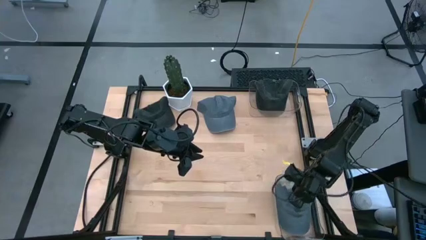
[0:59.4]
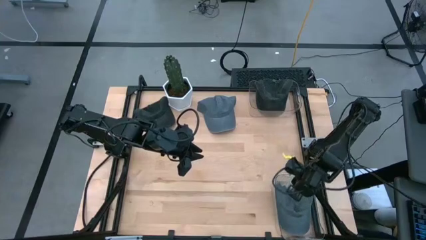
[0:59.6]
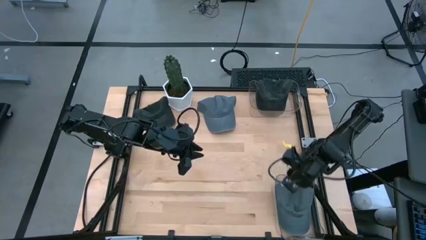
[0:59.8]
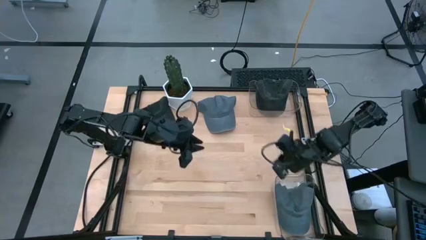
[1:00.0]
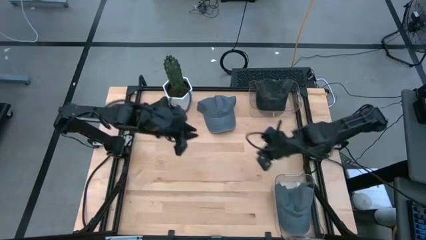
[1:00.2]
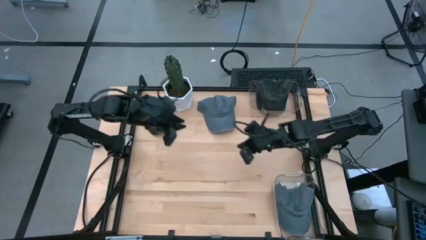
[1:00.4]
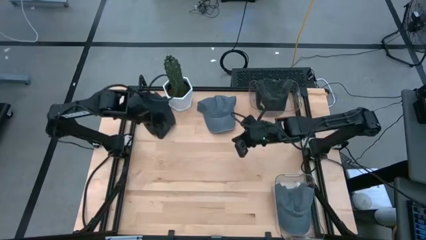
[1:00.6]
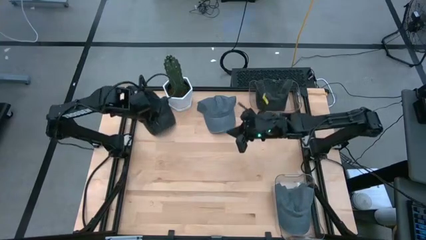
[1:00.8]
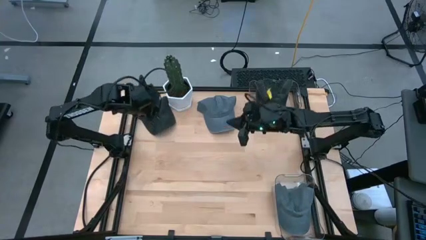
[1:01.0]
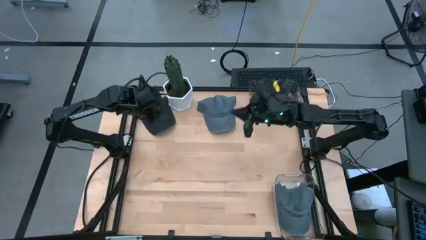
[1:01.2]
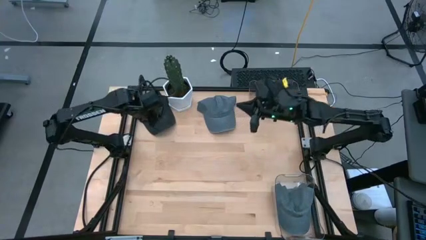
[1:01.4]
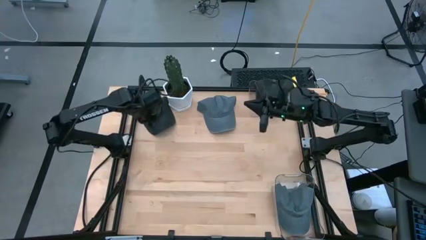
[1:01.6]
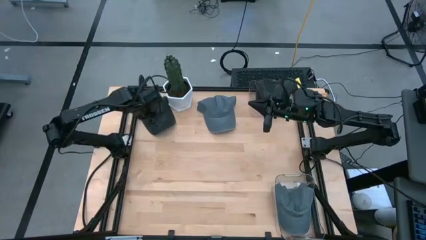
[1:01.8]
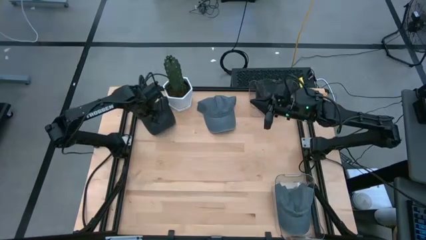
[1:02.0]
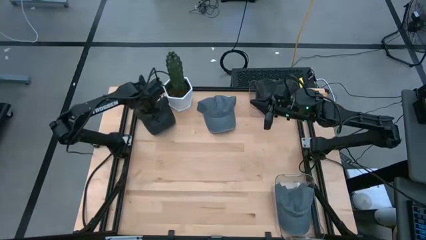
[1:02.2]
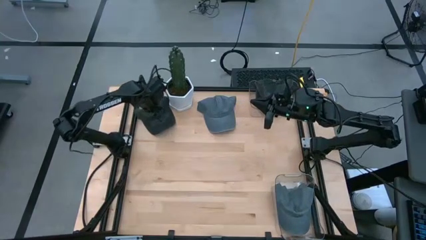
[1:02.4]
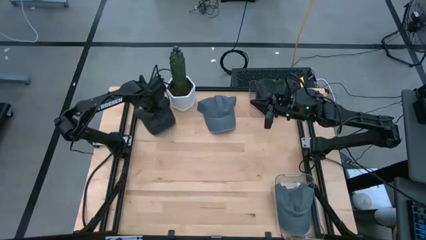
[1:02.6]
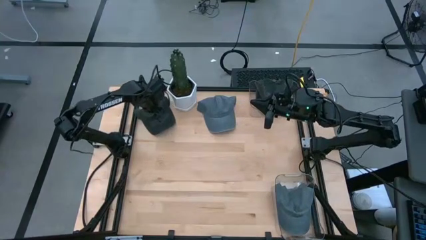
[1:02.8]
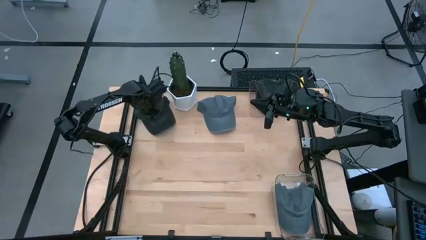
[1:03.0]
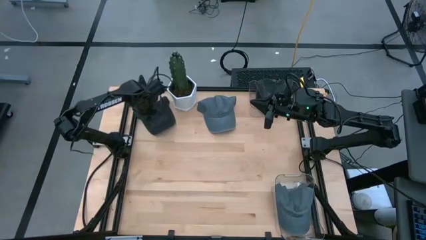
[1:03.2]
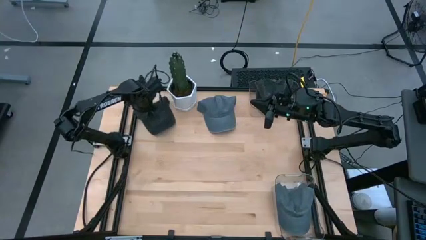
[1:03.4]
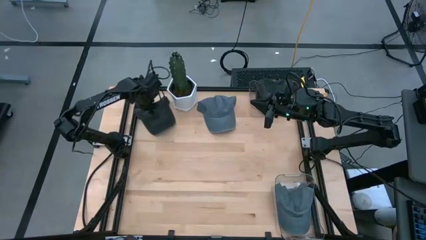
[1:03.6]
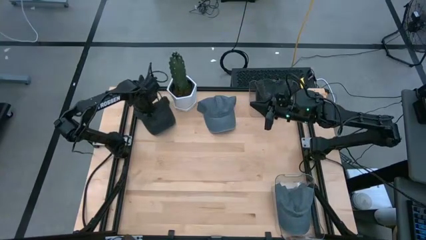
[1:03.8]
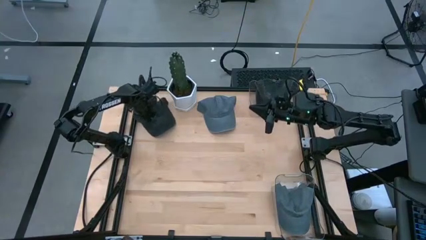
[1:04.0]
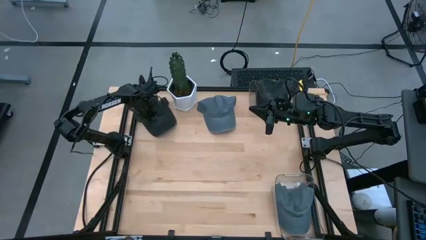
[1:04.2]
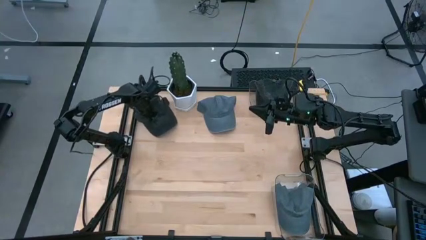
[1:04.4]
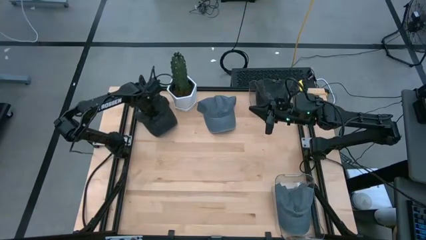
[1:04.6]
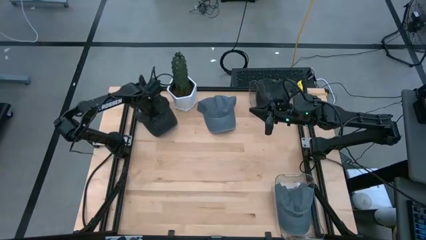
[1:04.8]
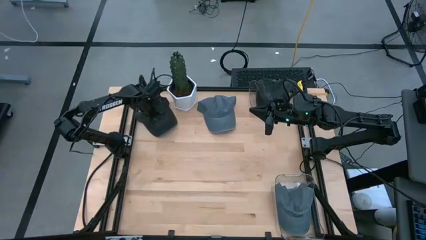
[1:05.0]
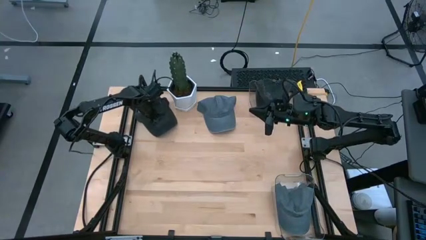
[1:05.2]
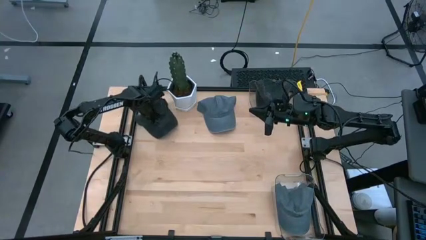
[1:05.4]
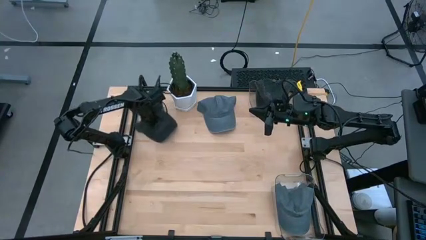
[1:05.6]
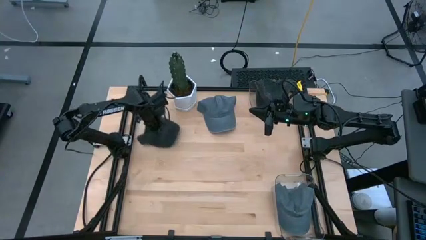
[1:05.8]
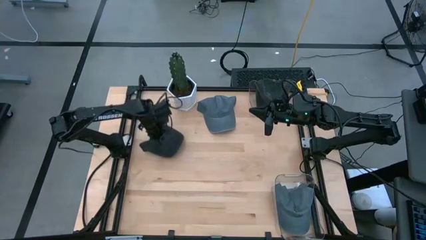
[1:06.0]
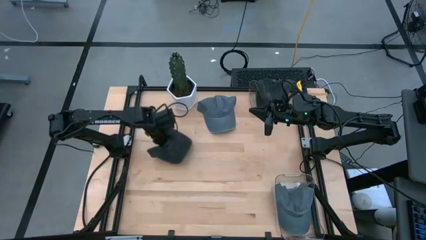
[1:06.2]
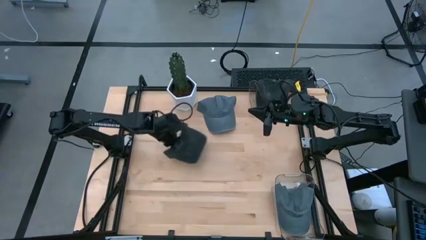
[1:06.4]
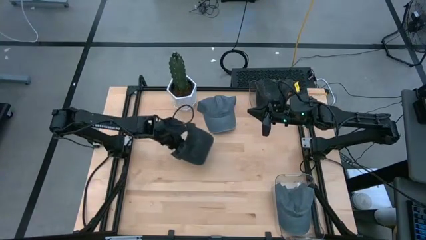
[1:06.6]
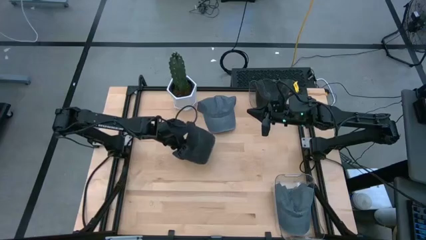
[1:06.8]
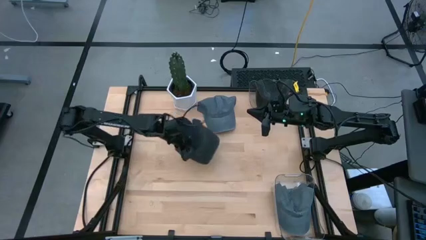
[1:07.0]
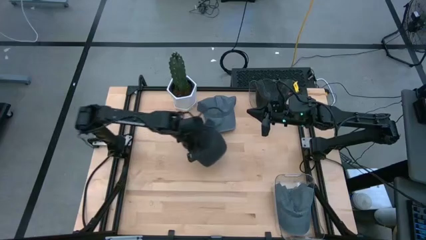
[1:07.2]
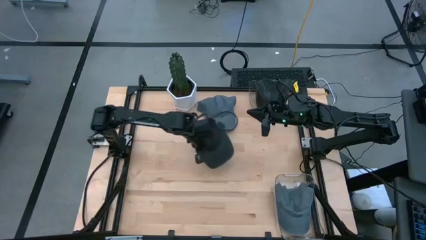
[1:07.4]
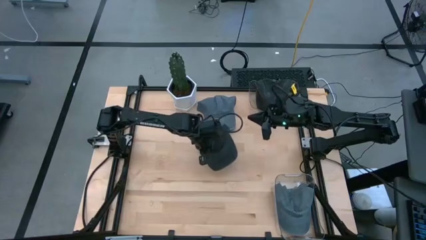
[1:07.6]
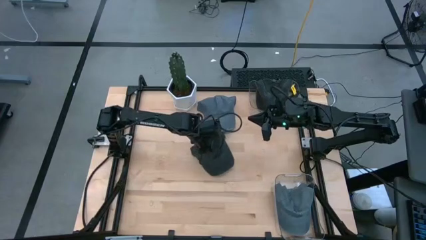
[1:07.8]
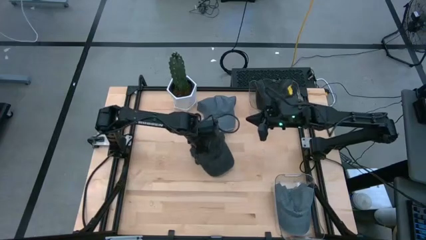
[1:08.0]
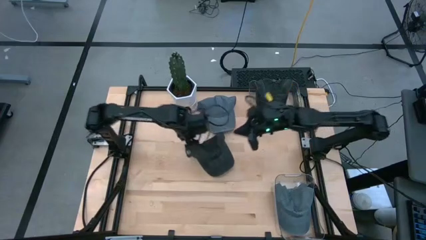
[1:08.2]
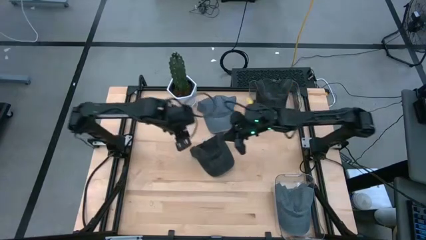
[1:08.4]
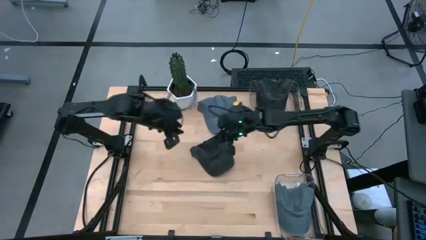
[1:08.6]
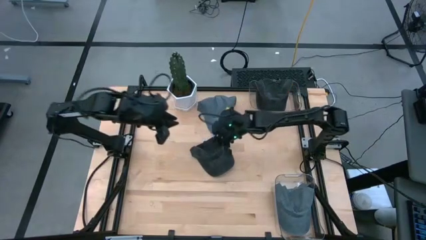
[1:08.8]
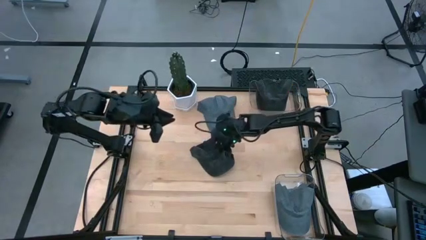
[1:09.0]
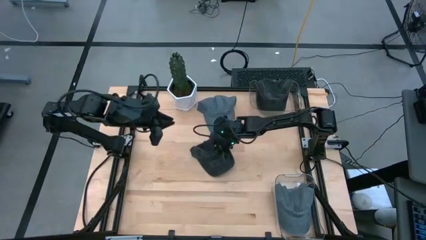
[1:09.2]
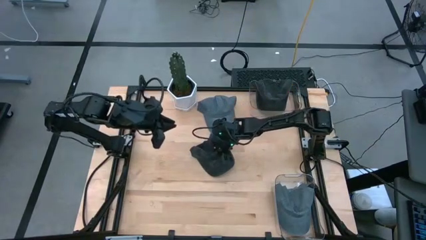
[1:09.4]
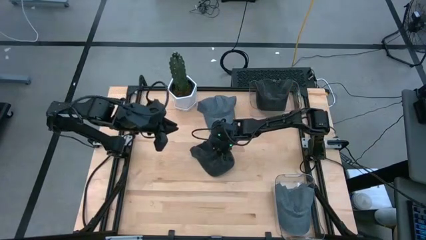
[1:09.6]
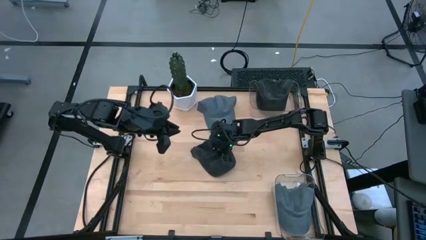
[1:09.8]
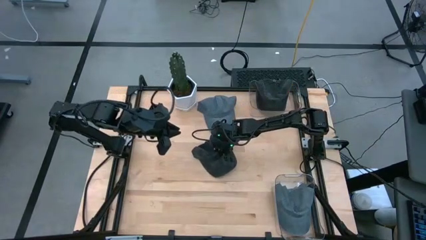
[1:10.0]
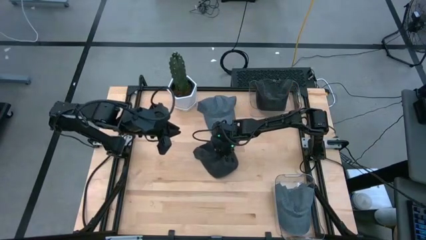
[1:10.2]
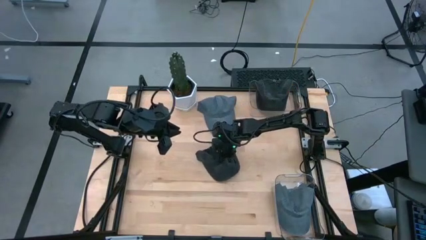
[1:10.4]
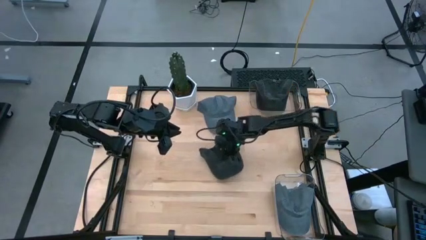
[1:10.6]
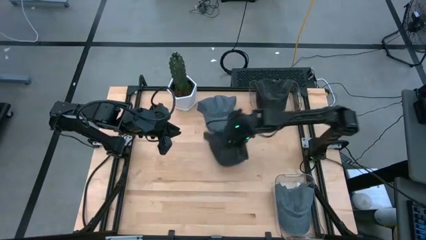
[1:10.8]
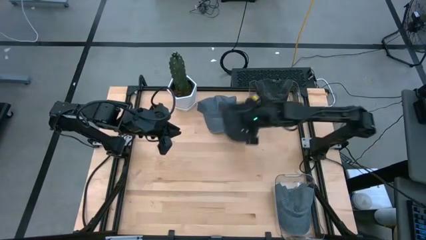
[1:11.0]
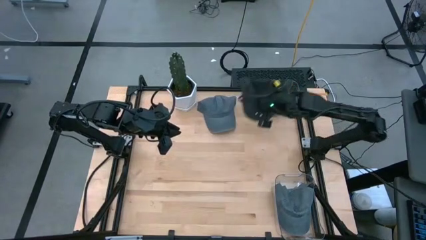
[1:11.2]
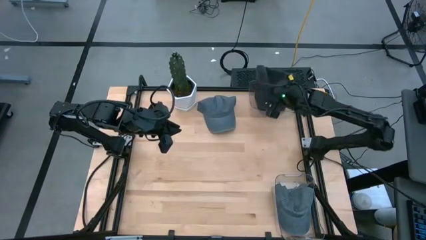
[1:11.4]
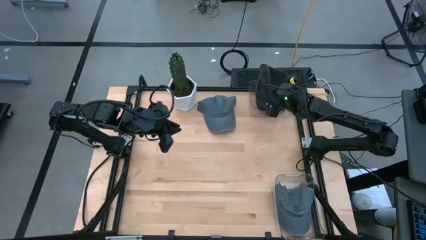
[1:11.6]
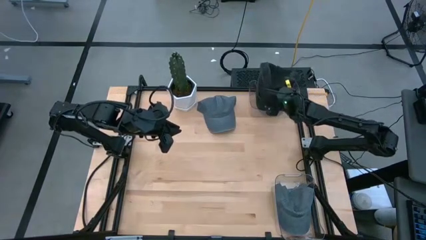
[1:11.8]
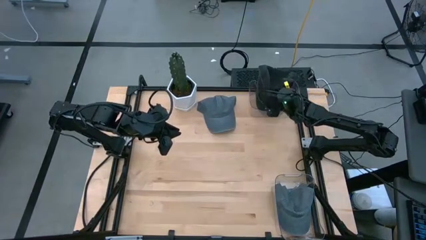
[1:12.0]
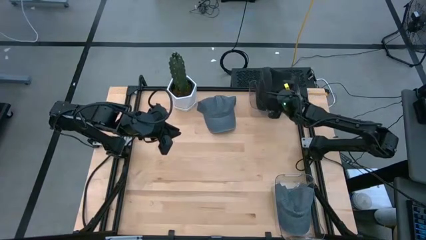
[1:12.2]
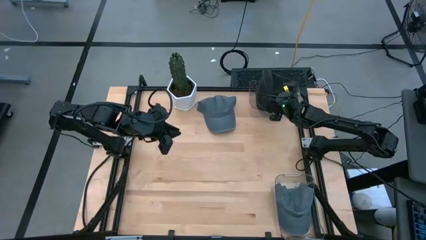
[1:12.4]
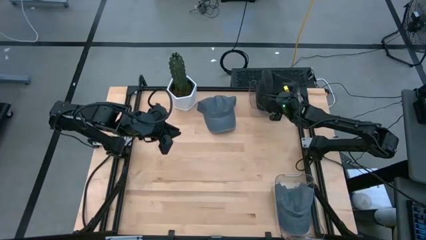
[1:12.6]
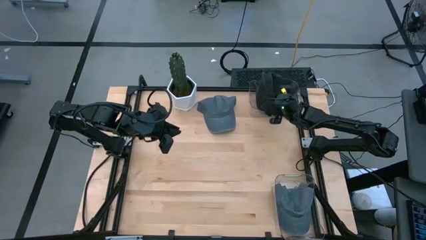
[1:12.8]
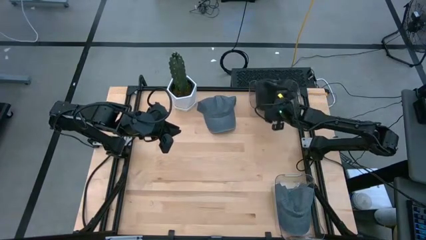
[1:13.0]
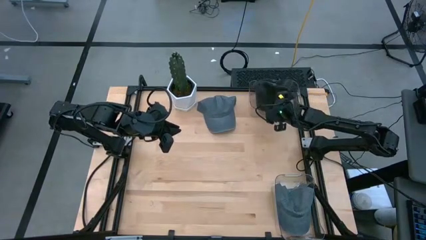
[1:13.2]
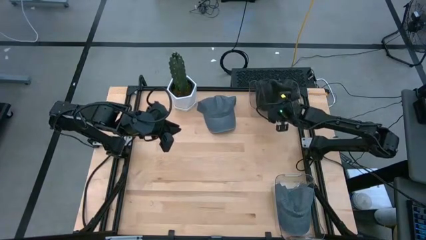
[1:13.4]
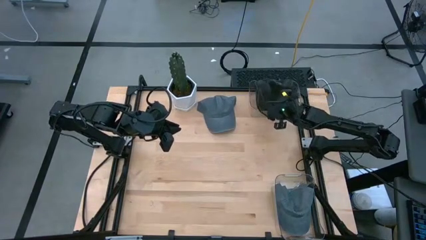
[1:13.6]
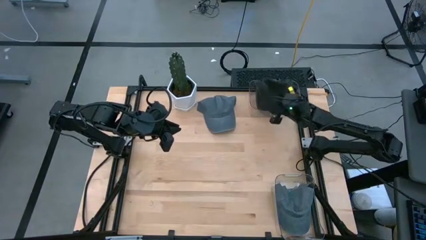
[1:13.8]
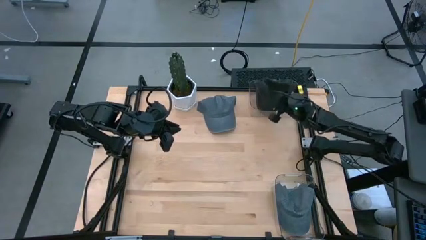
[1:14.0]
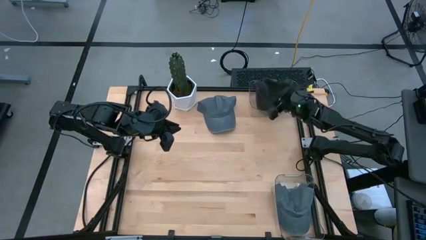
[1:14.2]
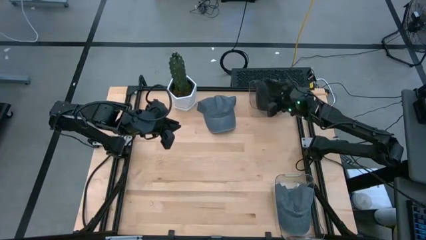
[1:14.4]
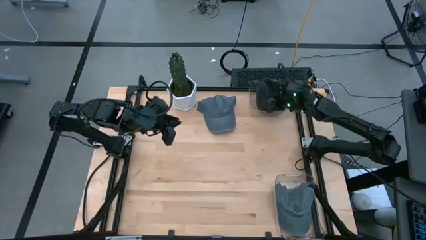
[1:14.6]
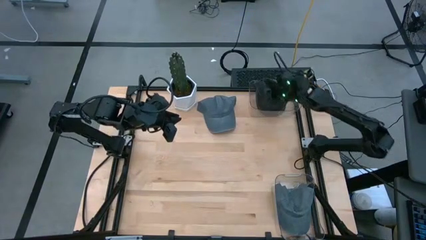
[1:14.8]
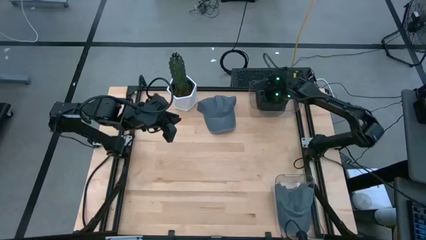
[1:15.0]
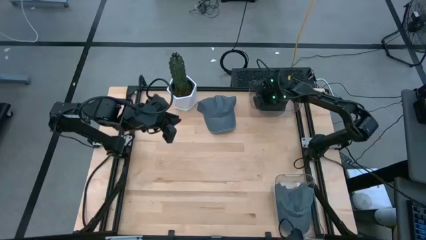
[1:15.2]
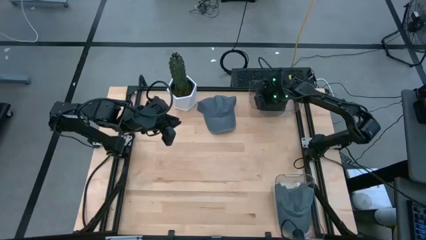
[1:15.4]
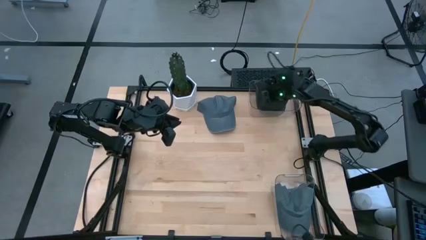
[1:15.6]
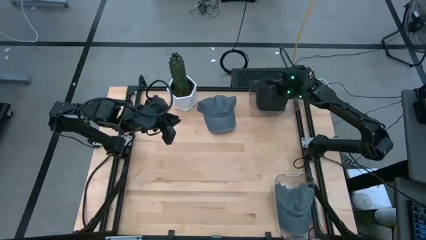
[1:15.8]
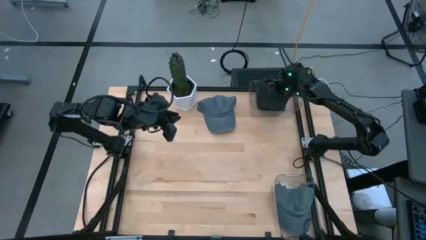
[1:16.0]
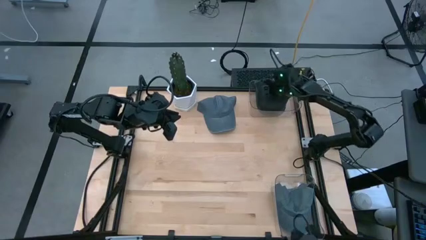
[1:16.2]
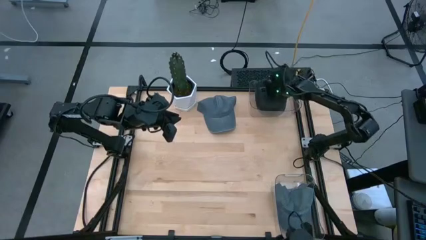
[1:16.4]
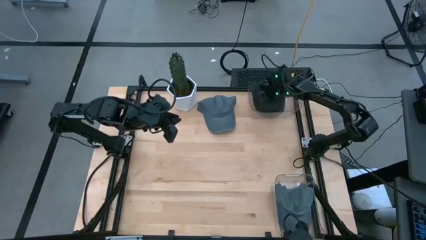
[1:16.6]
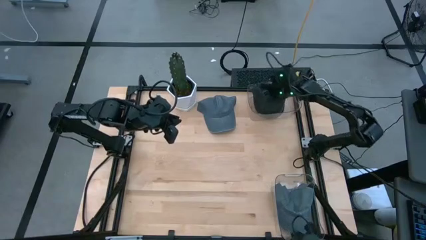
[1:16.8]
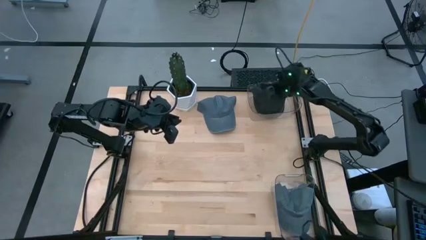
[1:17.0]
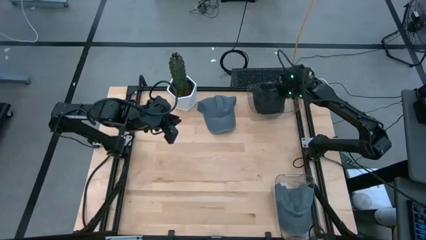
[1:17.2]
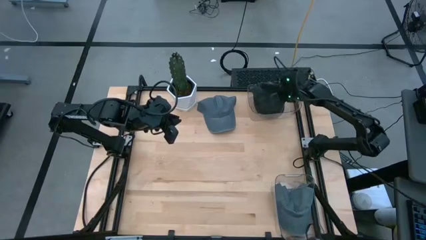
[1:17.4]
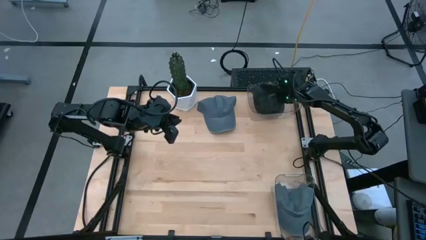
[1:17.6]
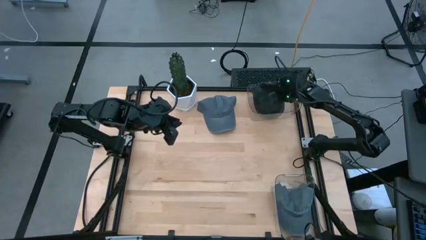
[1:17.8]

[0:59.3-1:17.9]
Task: Pick & Place hat
Put the black cap into the top transparent bin
